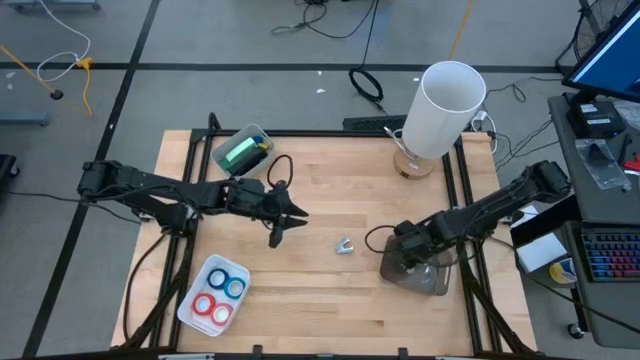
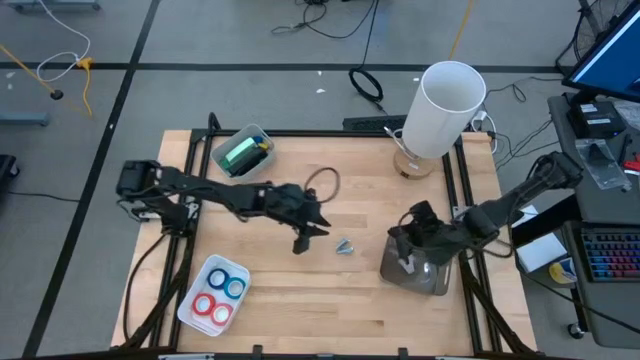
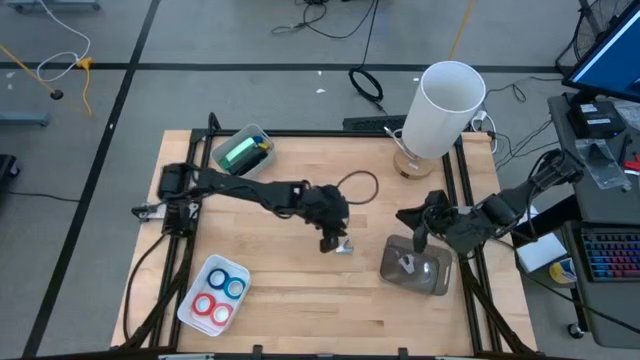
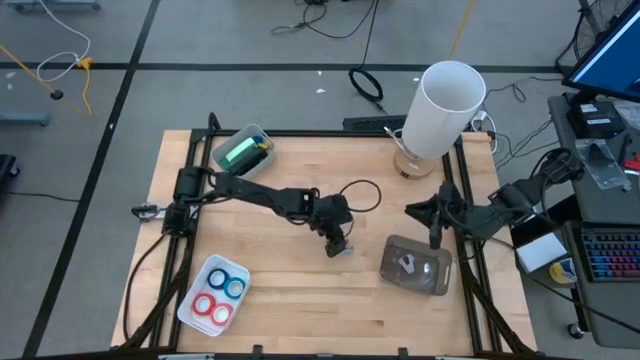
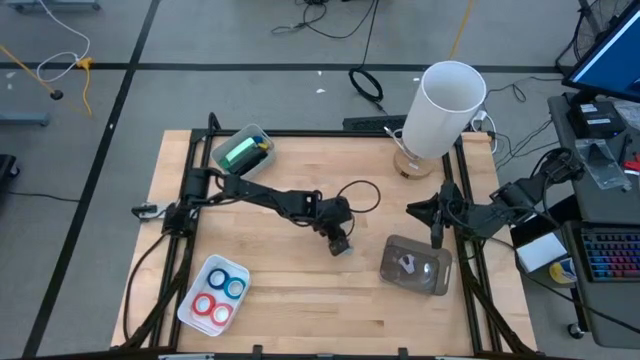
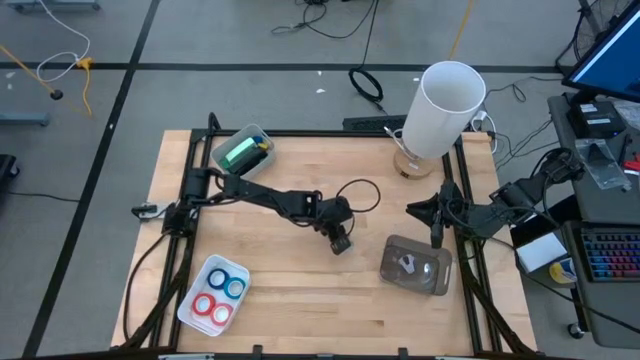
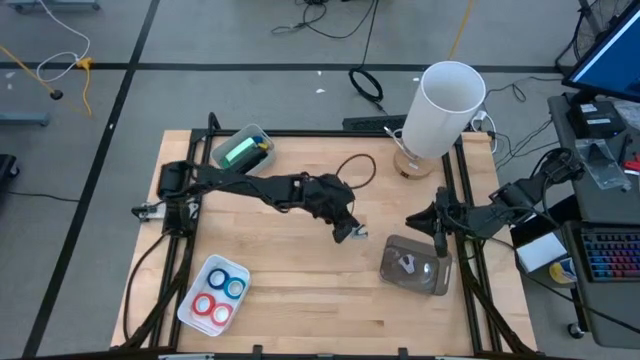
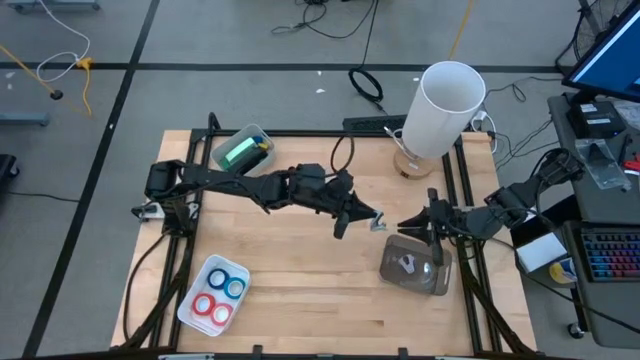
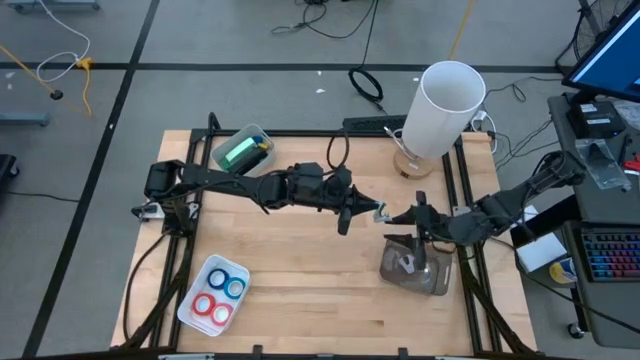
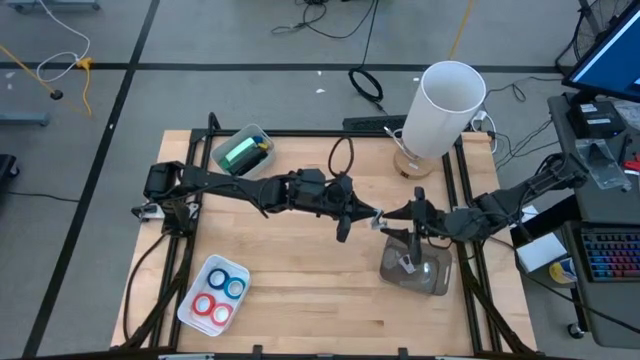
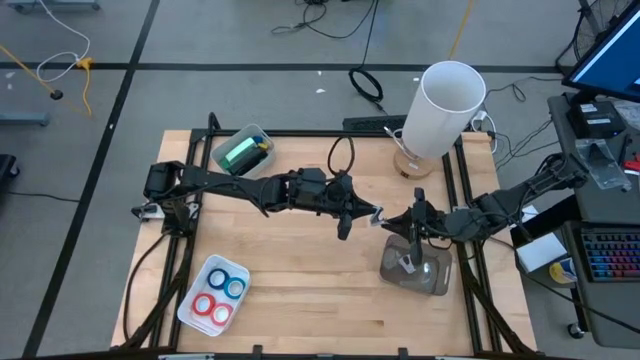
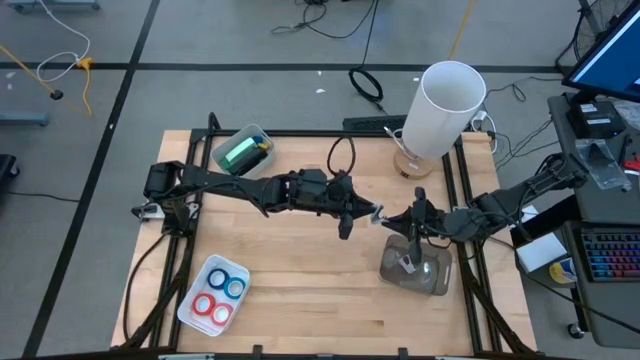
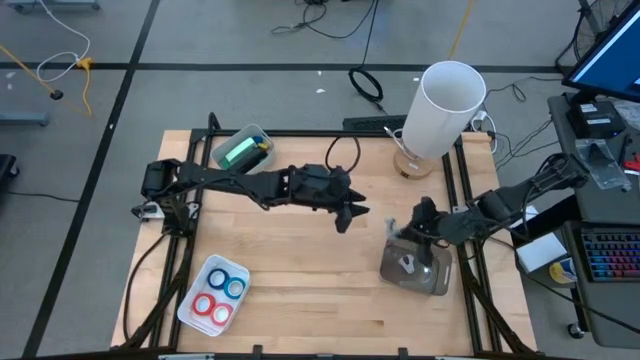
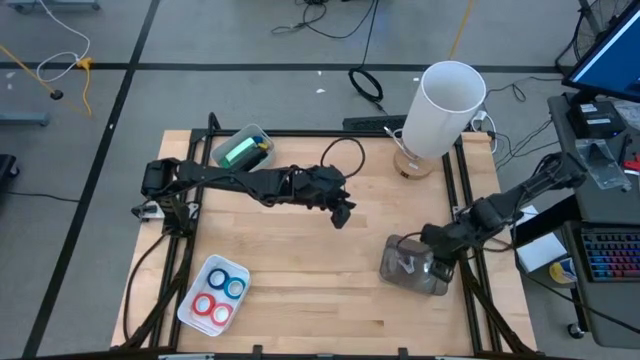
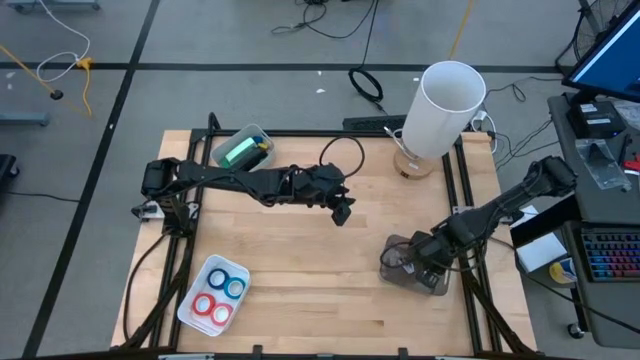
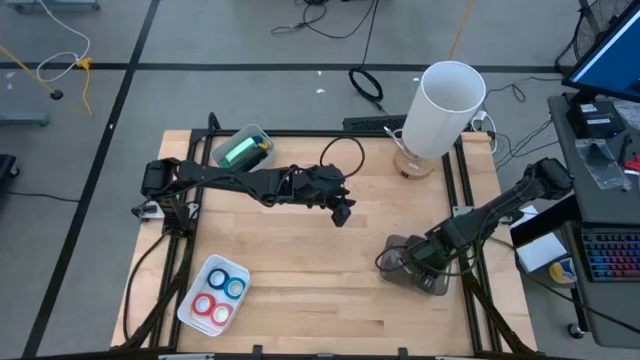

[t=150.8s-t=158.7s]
Task: Pick and place Stapler, Stapler remover, tape
Put the light blue staple remover into the black bin

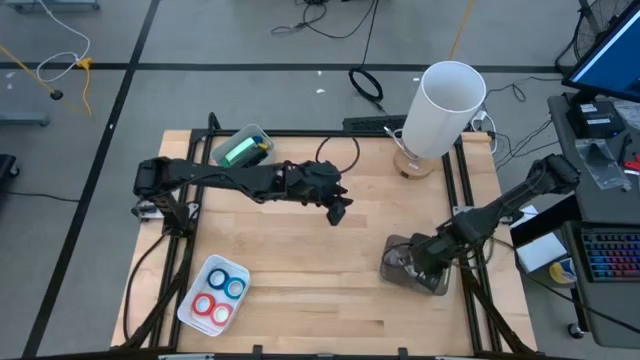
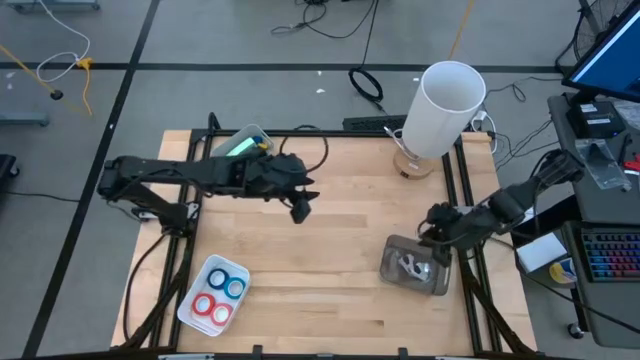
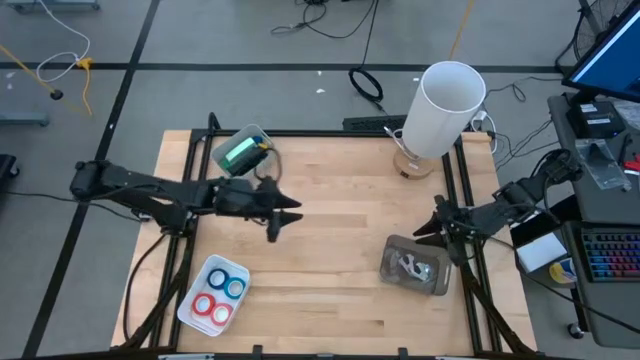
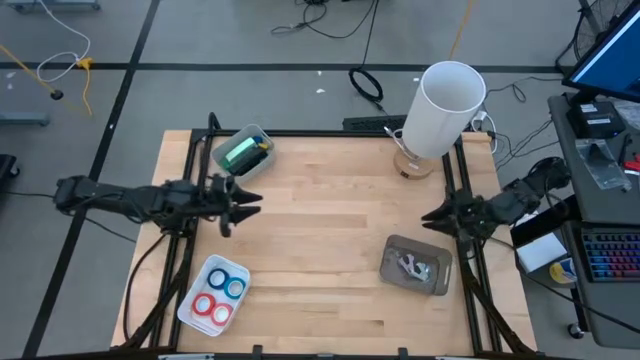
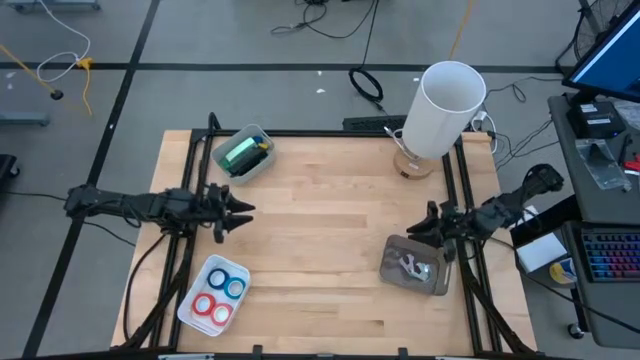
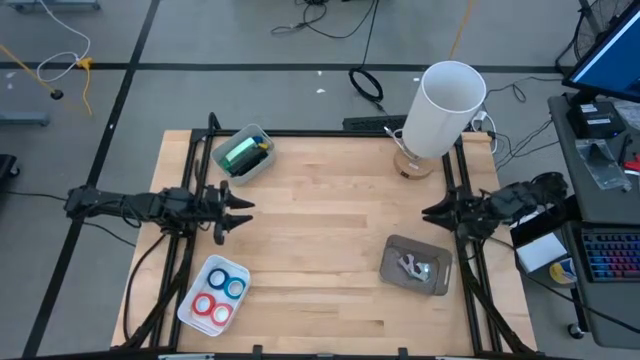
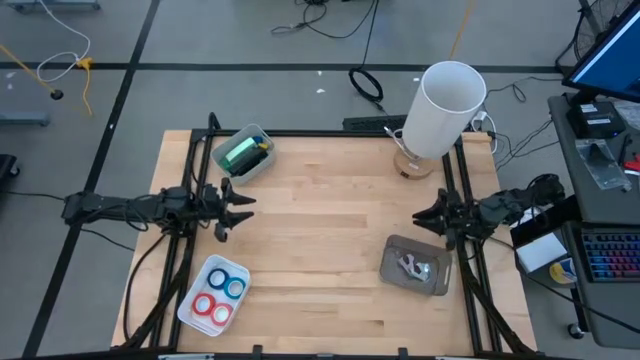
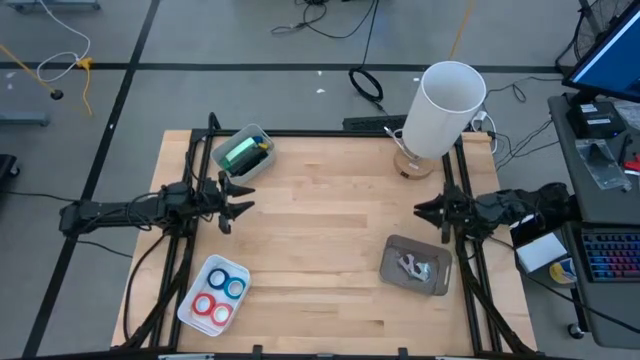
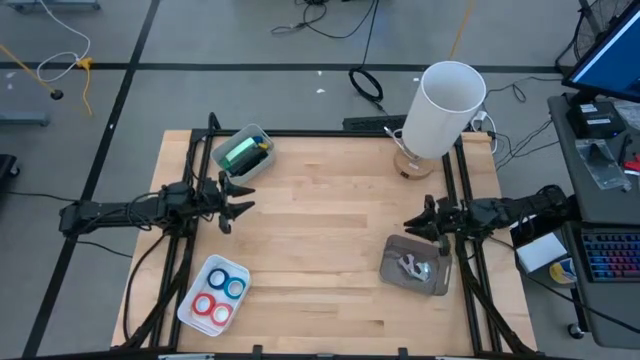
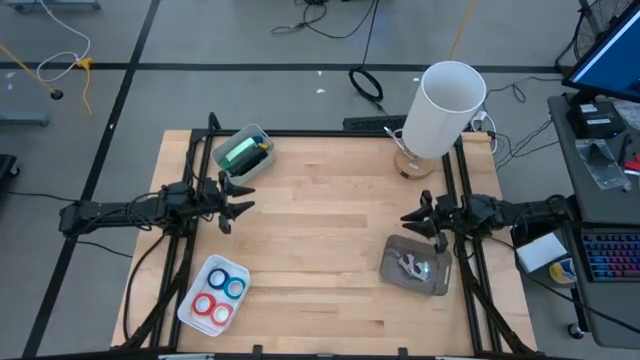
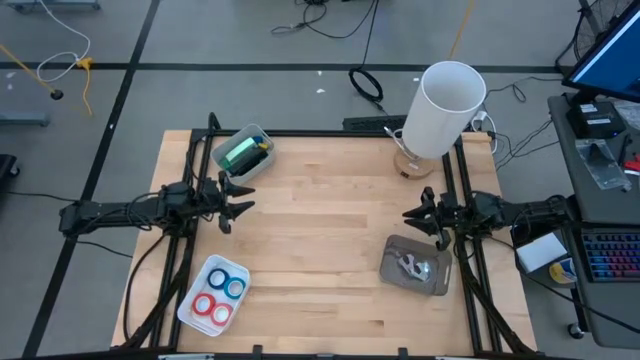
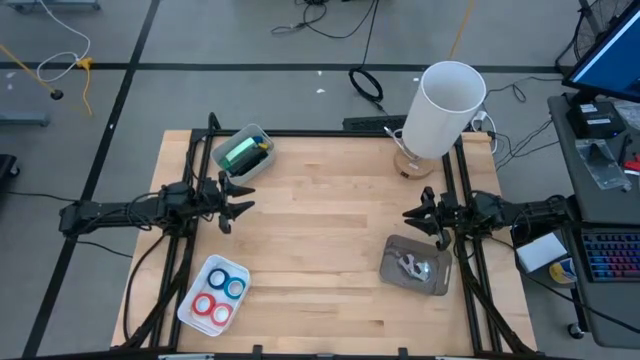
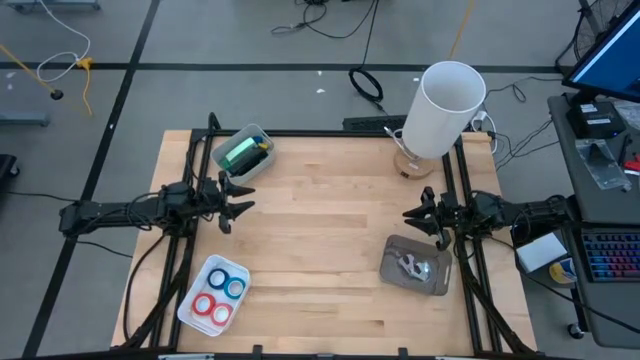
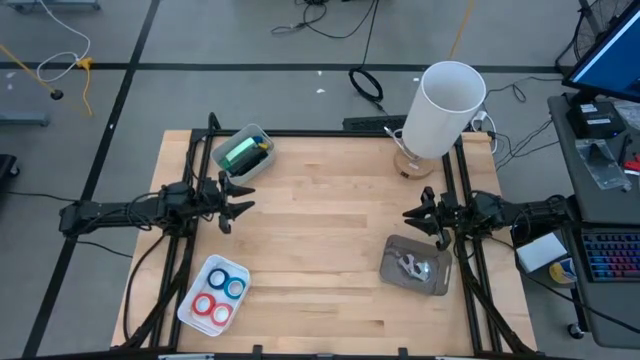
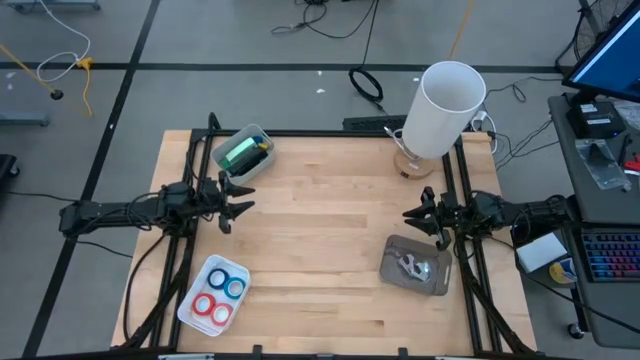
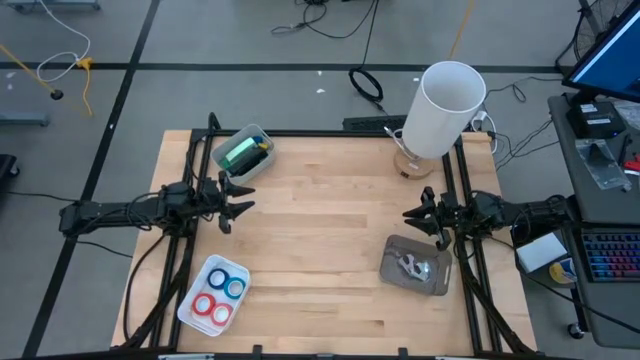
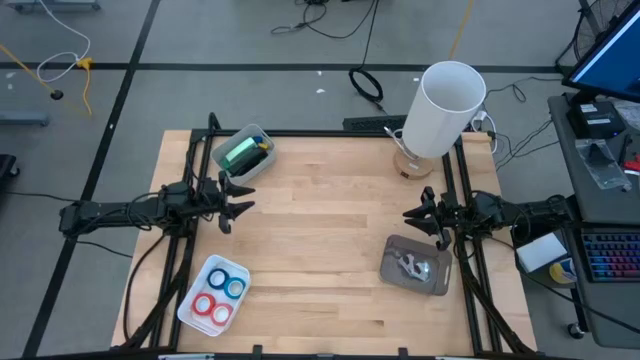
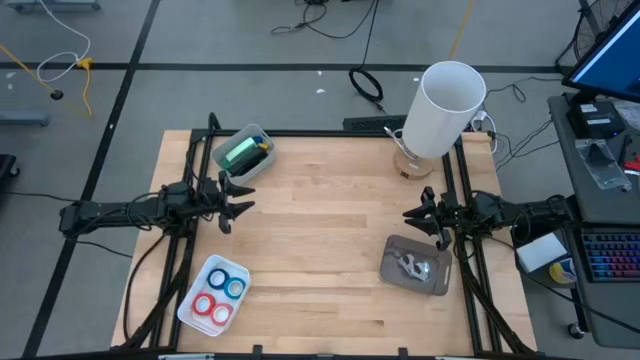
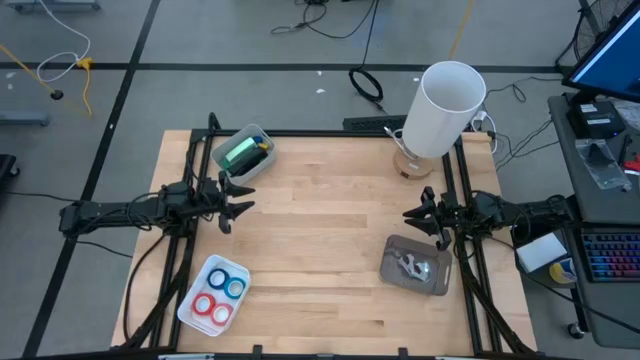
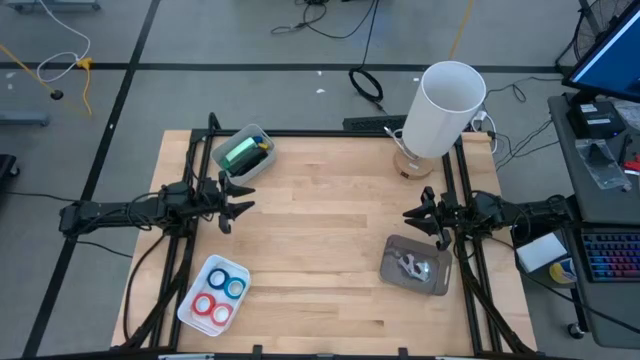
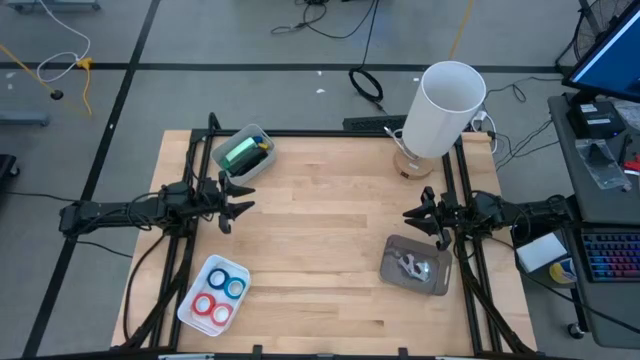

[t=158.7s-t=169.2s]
Return to Home Position
